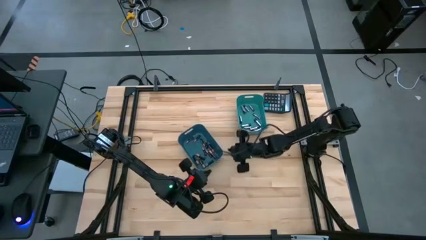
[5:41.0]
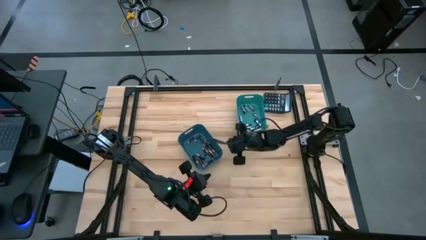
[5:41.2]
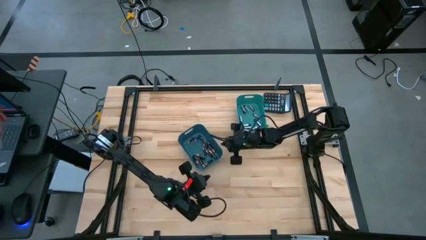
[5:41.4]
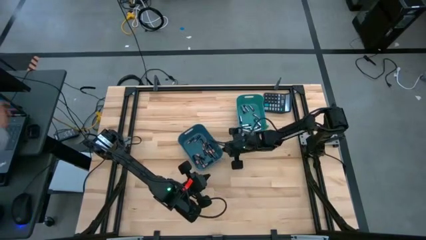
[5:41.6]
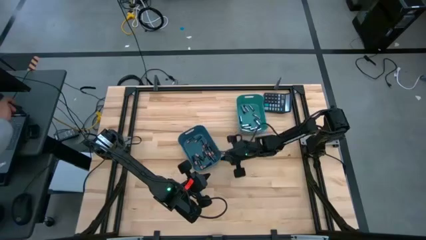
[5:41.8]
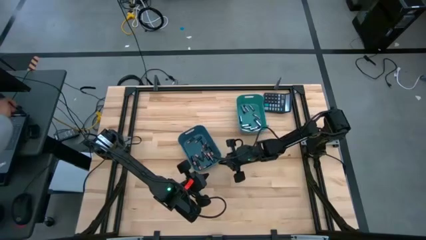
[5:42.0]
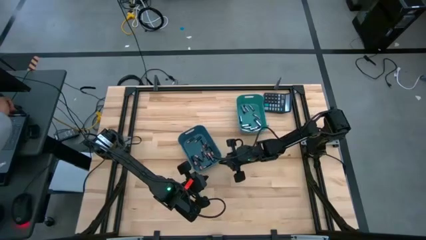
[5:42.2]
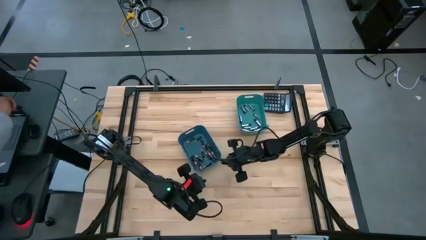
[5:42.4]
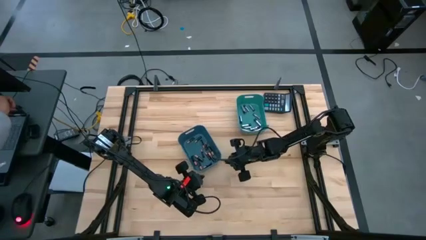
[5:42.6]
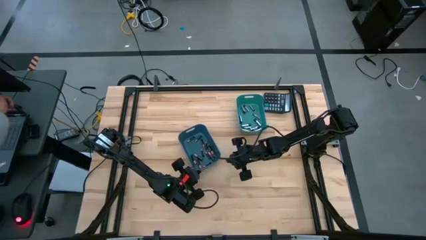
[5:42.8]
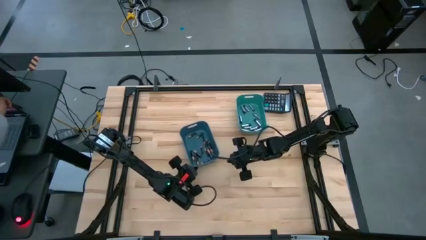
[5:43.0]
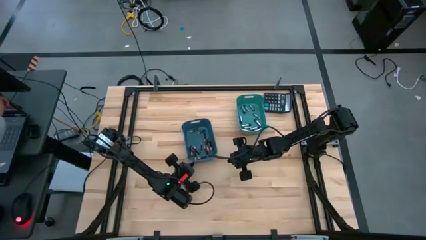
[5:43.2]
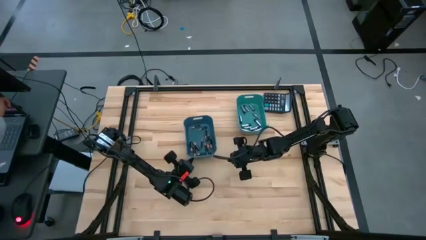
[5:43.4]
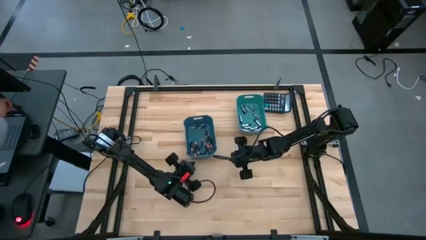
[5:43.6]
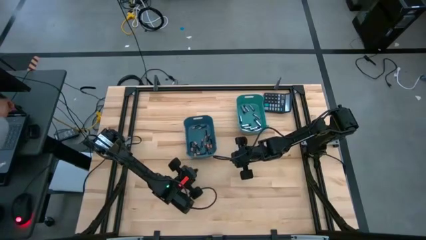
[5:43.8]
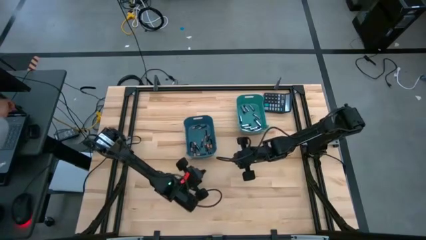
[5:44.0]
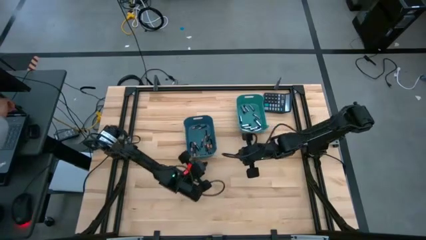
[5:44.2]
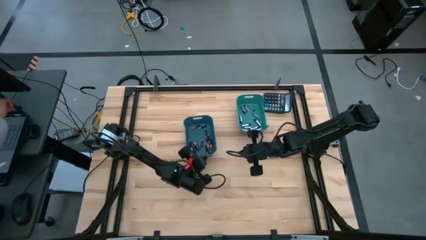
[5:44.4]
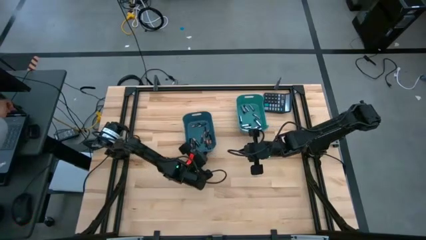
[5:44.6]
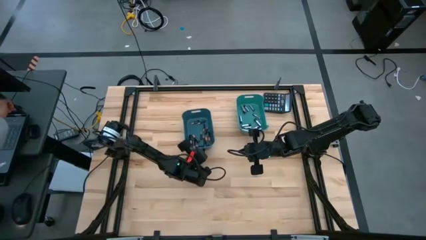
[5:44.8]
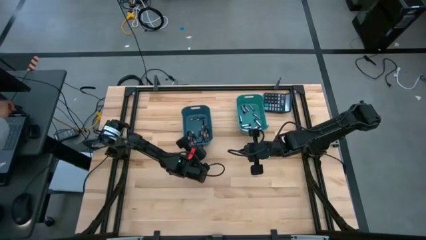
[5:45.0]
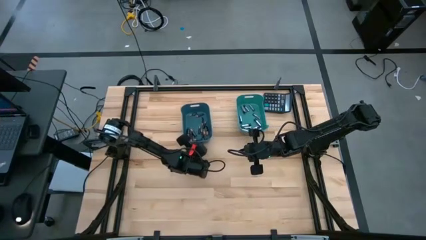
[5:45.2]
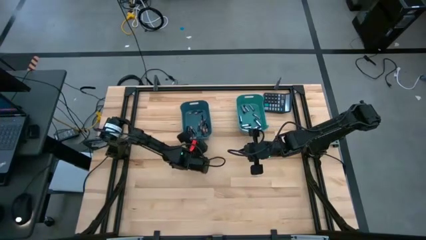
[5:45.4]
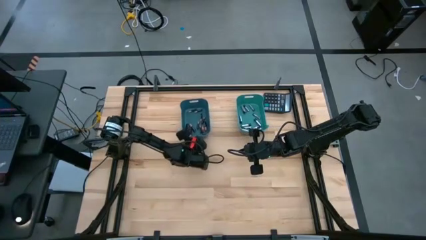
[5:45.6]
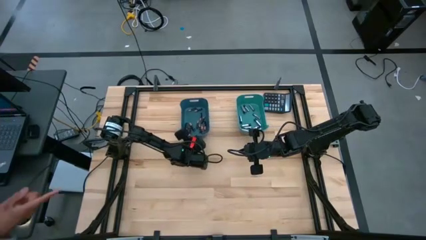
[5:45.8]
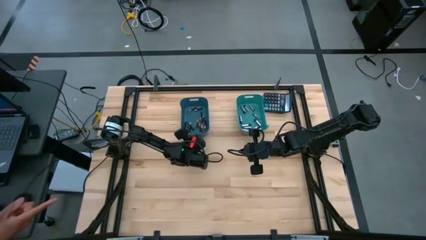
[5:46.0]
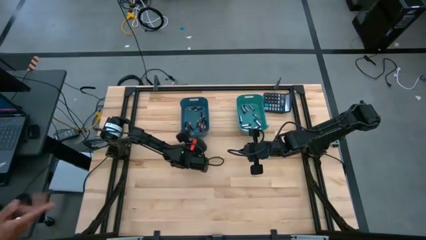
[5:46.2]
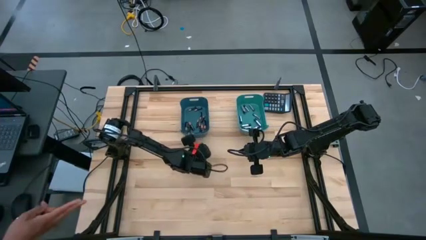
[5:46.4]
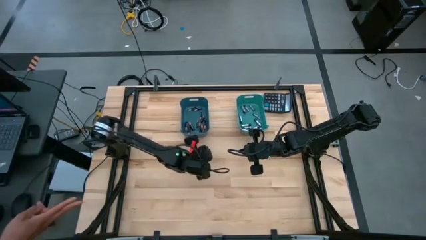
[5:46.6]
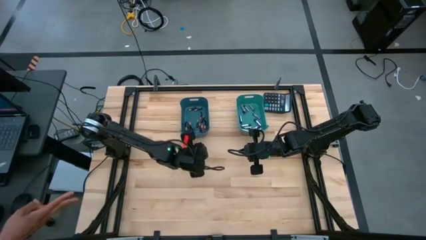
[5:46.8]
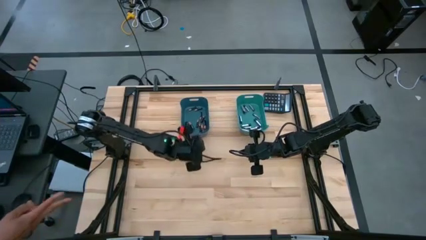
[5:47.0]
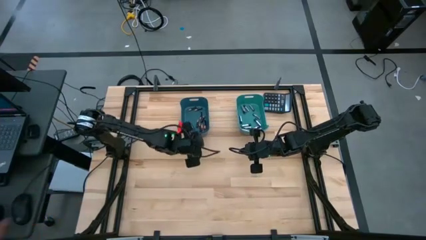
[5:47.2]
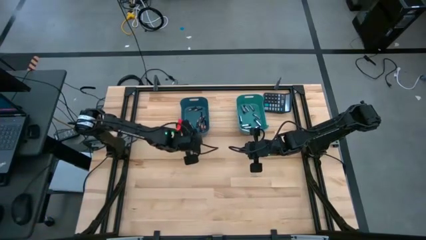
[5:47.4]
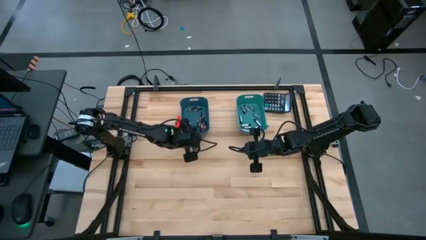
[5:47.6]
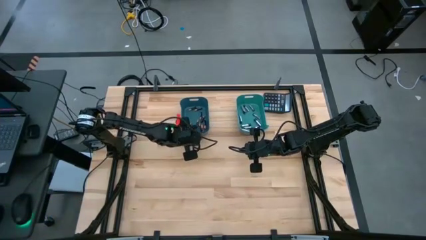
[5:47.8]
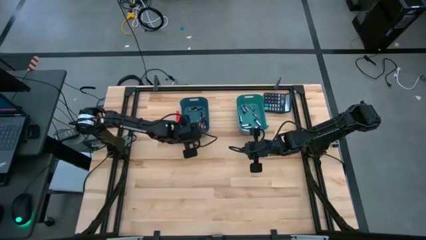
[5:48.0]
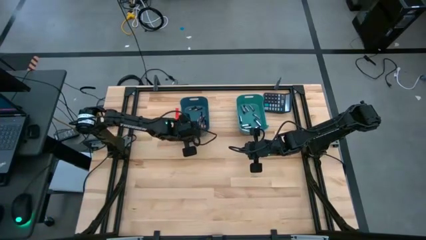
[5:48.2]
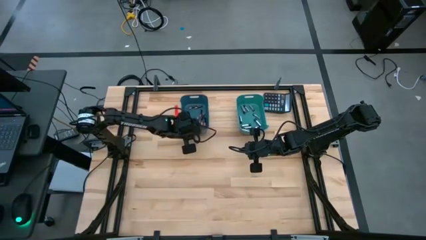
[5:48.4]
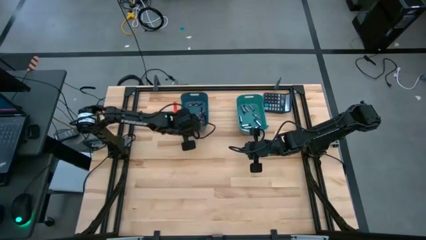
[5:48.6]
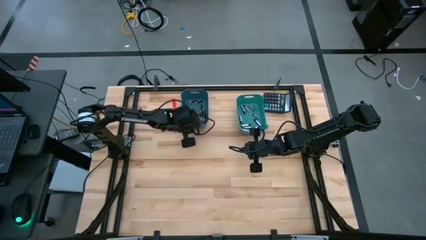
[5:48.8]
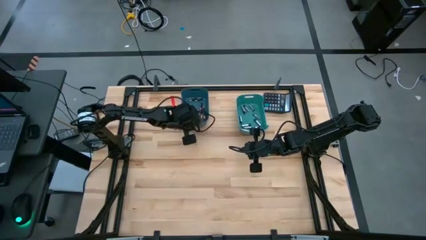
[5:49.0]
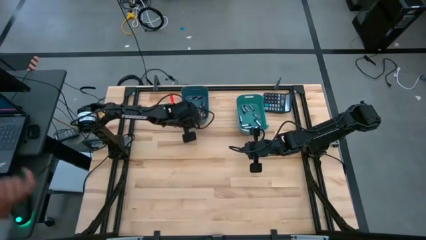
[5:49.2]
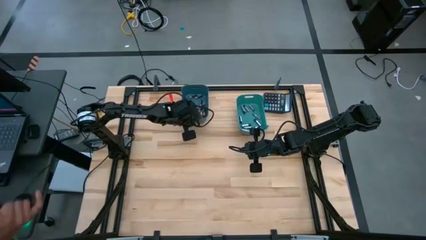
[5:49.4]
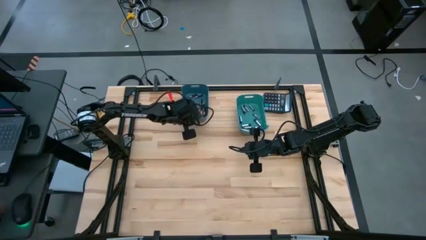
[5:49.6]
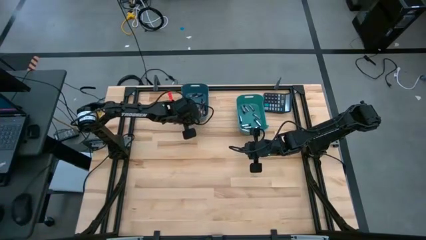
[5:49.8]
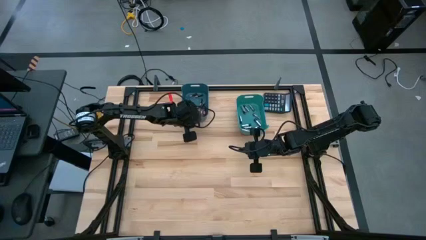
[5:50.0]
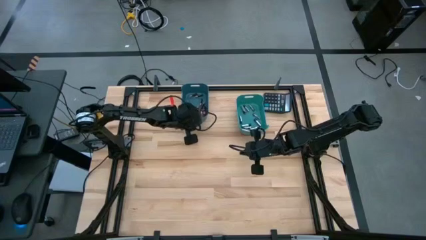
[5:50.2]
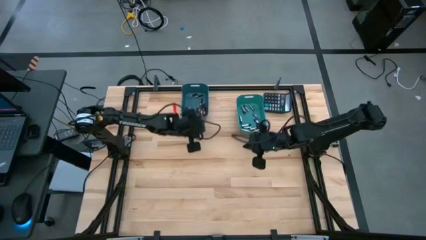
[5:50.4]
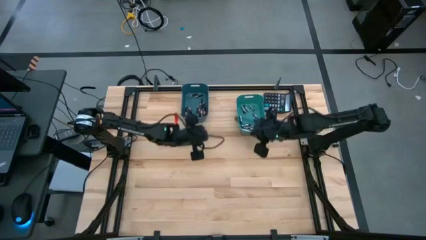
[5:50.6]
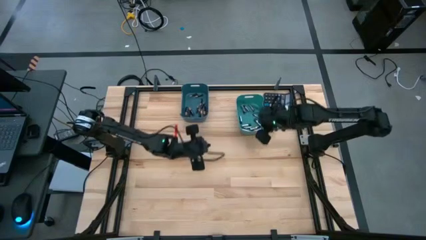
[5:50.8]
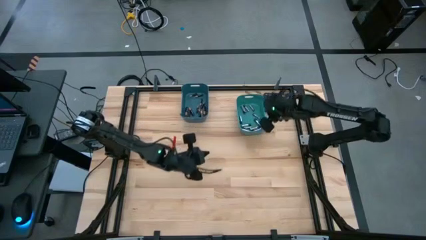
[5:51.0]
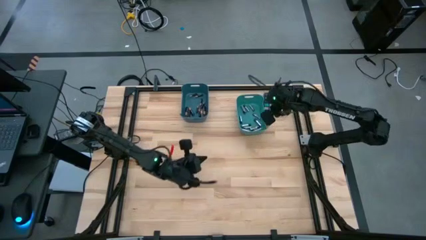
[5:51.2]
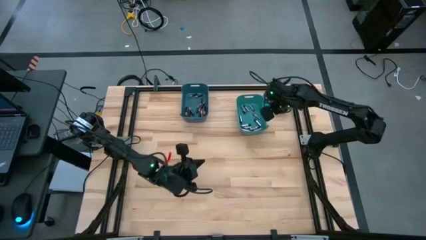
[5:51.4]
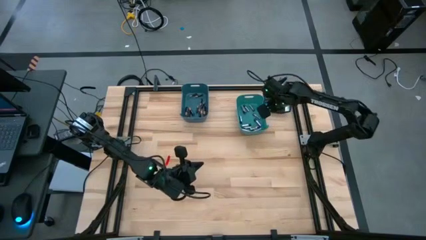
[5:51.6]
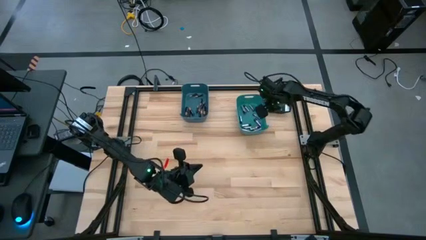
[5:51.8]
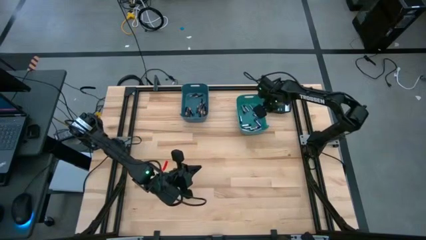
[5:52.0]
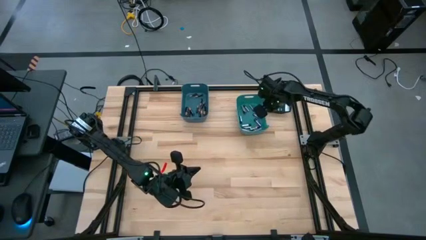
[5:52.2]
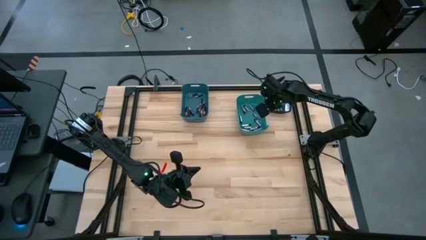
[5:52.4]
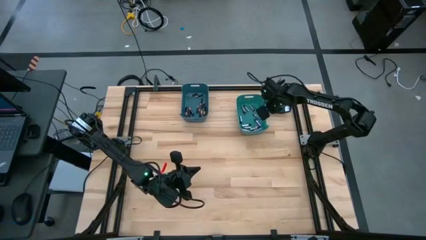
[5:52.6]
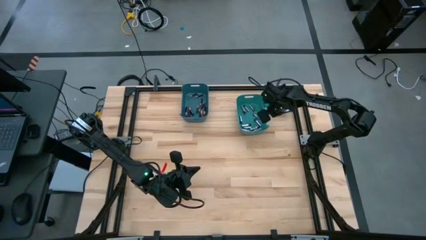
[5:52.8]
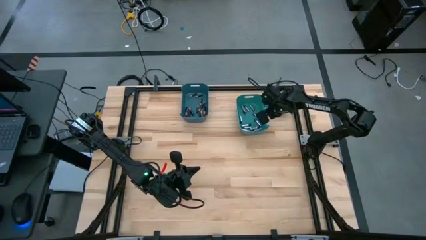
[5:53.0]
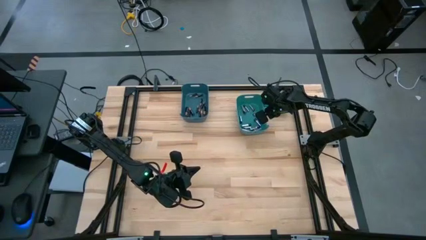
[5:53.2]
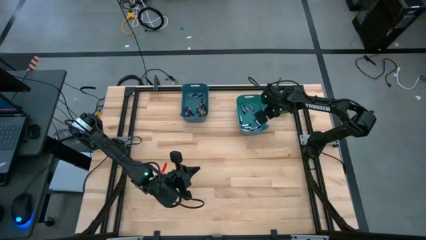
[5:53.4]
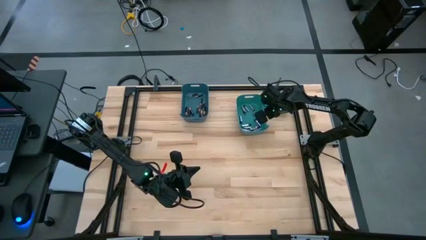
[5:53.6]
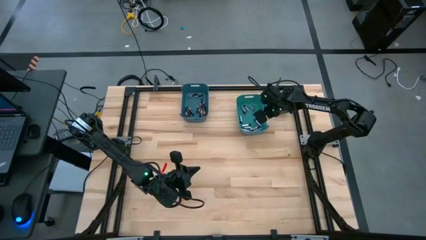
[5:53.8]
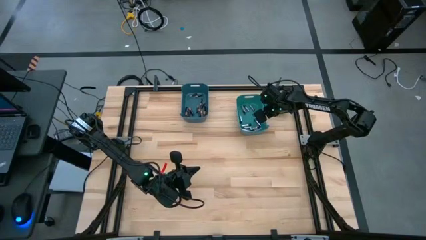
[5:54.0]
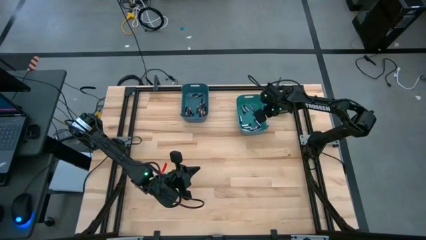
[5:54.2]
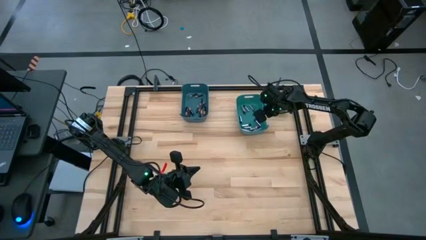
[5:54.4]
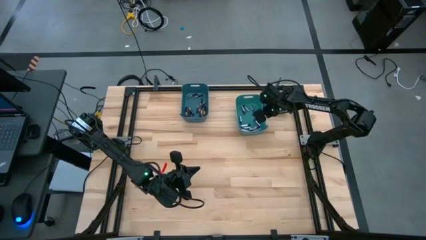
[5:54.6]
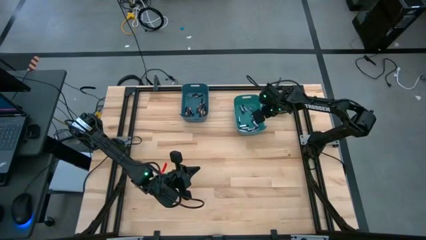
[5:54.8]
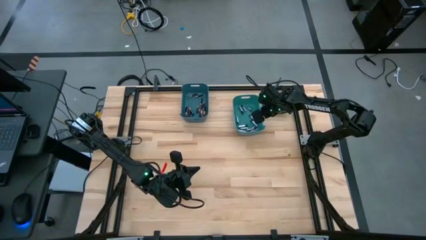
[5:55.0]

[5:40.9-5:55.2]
Task: Sort batteries
Move all the bins to the top corner of the table

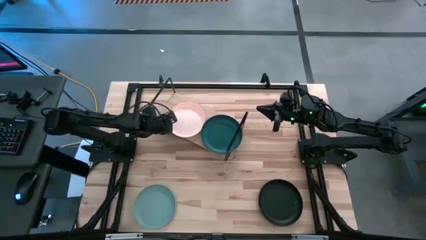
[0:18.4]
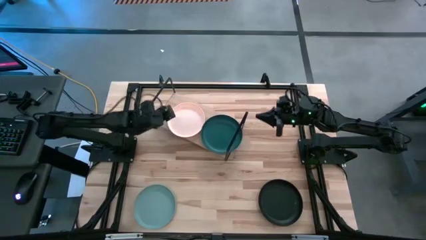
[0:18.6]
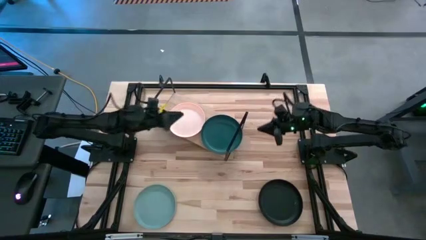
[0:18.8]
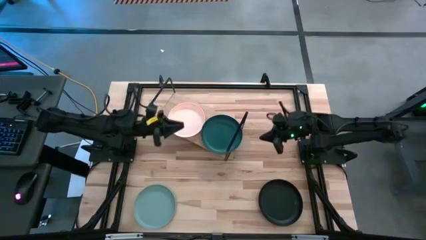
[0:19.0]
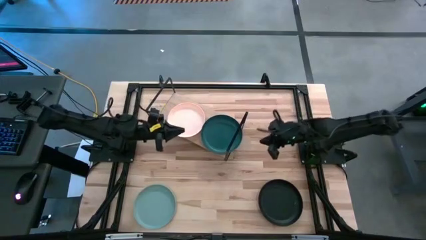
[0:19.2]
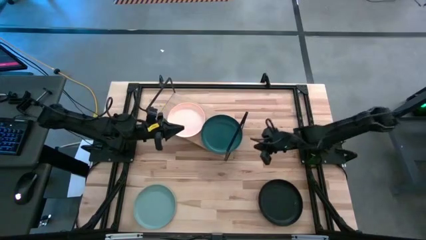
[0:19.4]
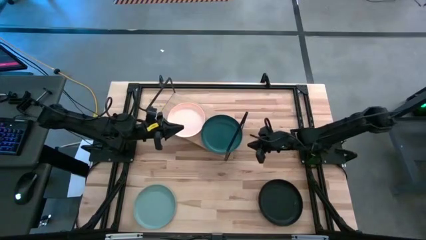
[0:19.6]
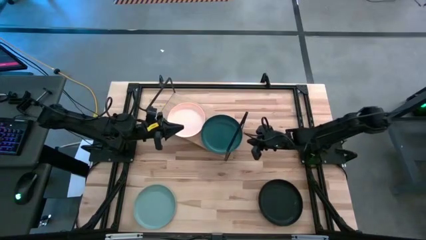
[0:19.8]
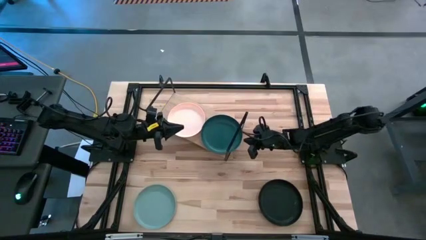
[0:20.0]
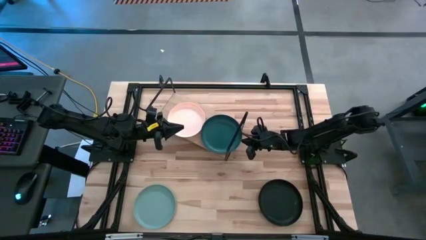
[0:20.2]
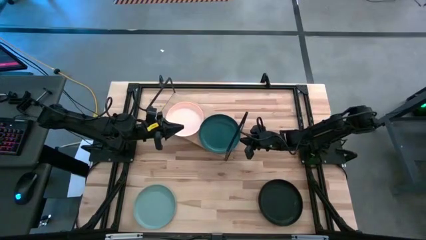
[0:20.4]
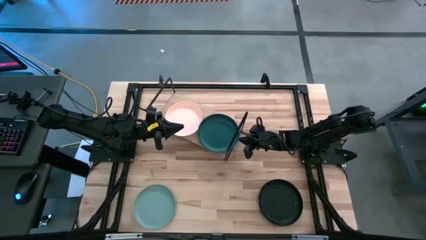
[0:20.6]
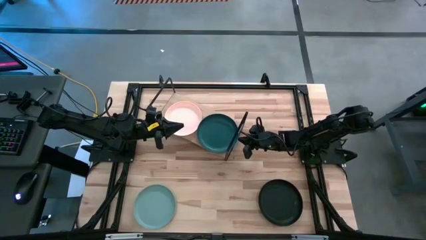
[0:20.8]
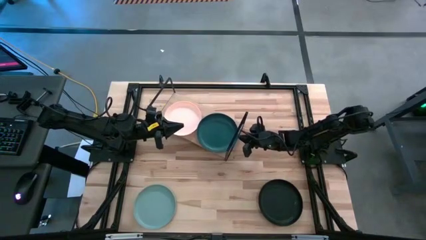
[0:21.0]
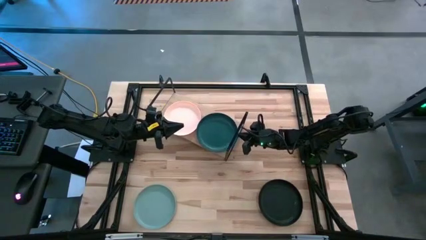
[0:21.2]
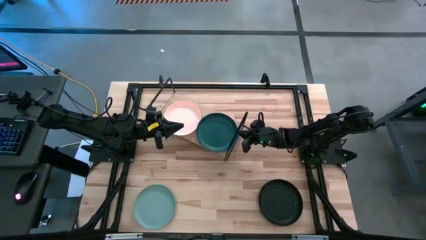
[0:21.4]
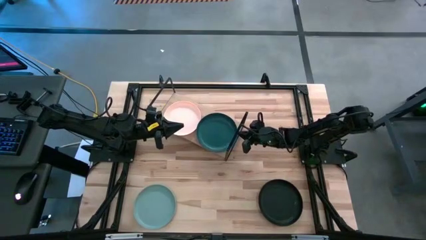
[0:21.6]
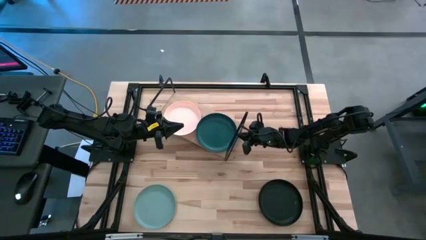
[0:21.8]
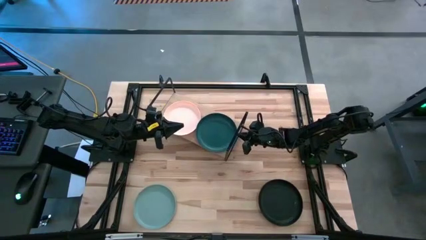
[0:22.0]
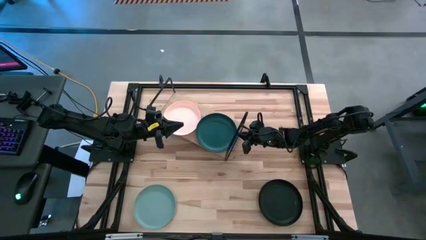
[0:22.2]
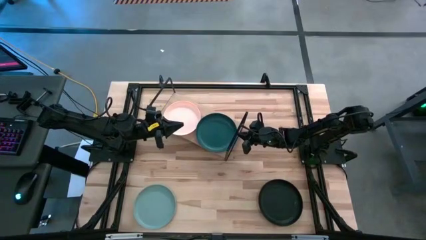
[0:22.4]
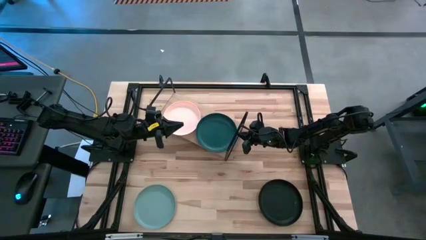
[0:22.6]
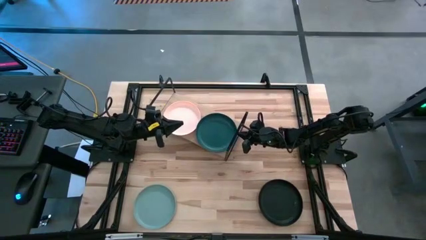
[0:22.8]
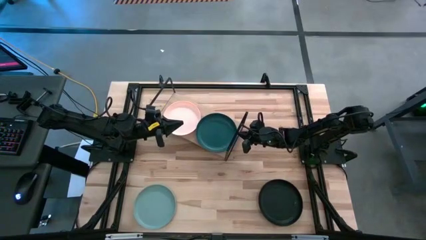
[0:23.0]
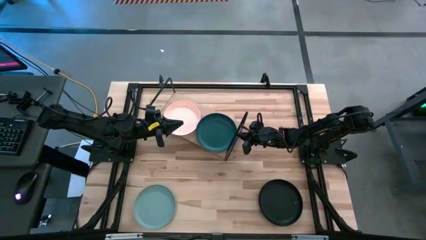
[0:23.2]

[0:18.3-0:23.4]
Task: Place and stack plates onto a shelf
Adjust the dark green plate on the shelf
